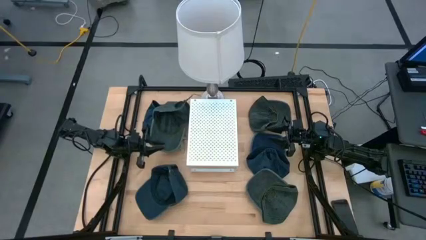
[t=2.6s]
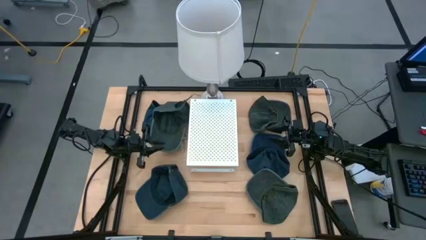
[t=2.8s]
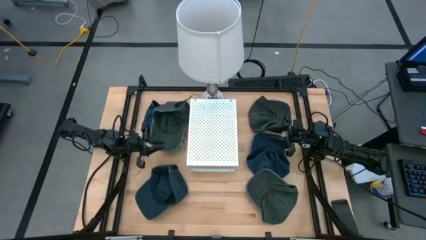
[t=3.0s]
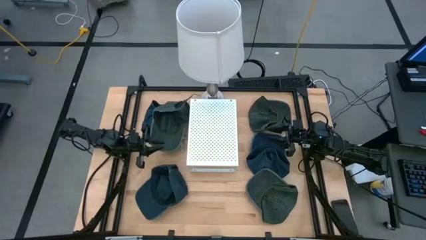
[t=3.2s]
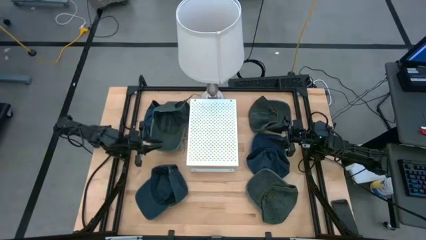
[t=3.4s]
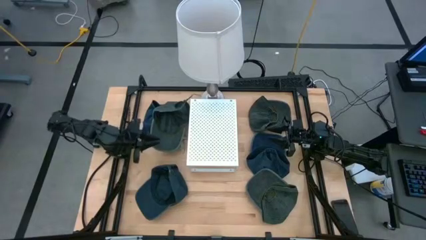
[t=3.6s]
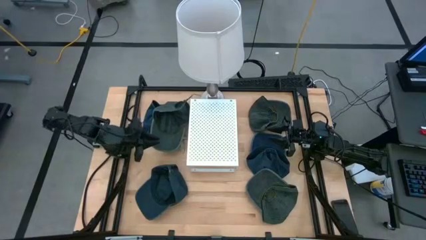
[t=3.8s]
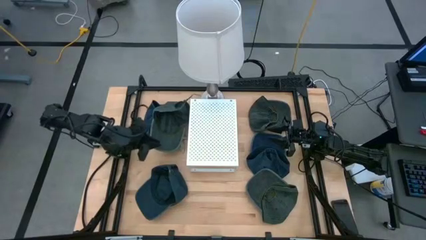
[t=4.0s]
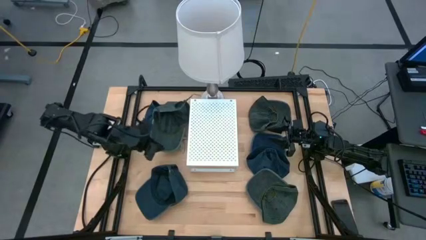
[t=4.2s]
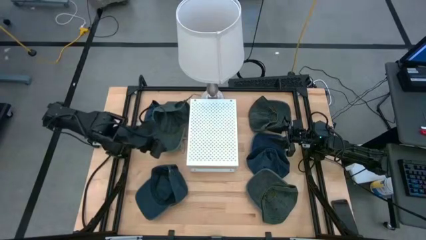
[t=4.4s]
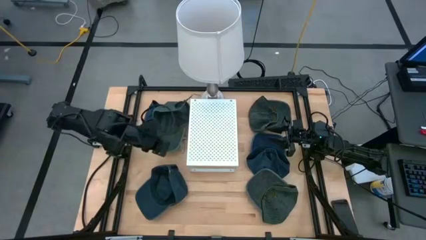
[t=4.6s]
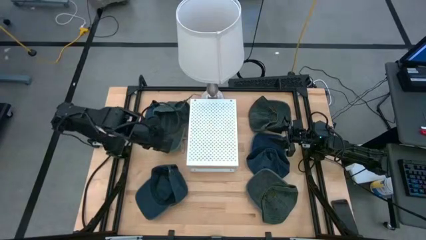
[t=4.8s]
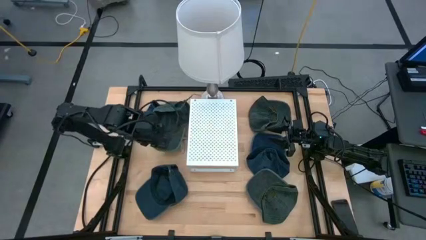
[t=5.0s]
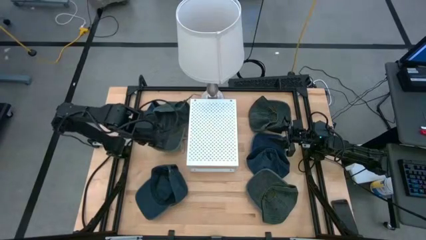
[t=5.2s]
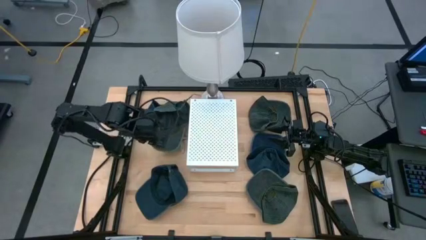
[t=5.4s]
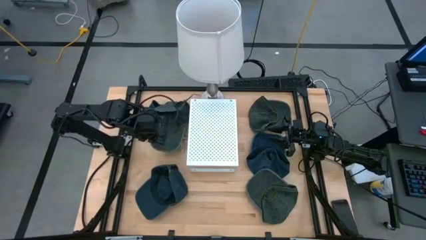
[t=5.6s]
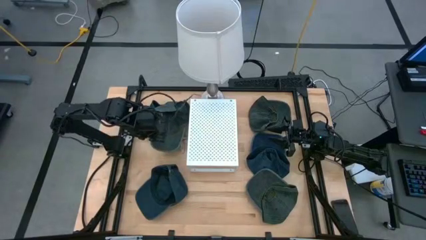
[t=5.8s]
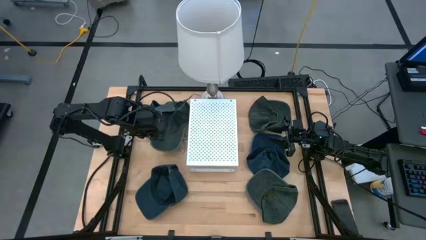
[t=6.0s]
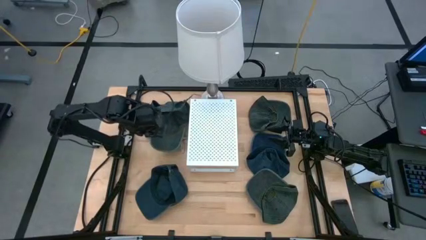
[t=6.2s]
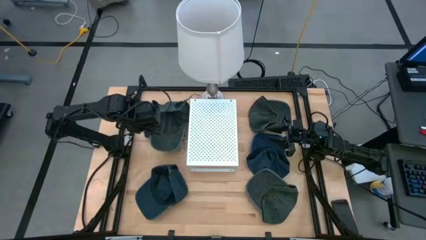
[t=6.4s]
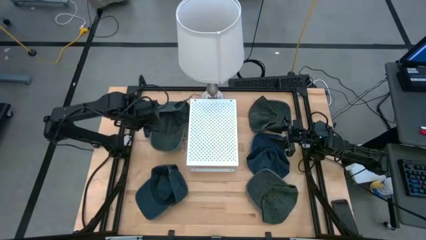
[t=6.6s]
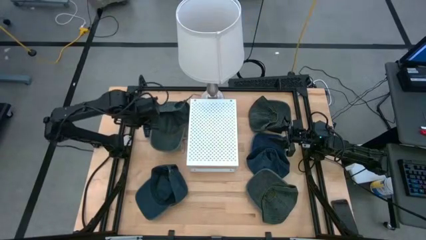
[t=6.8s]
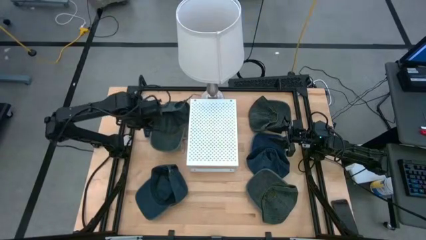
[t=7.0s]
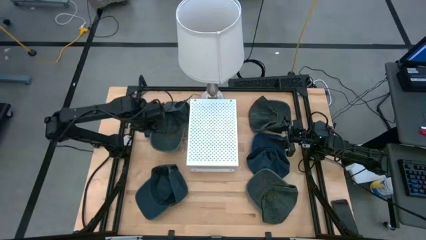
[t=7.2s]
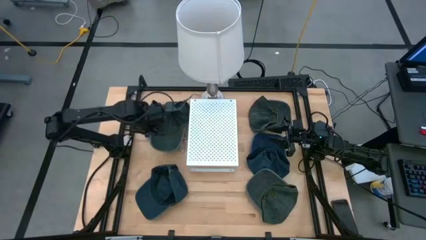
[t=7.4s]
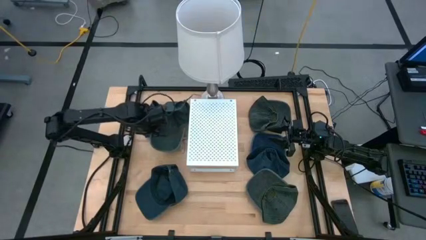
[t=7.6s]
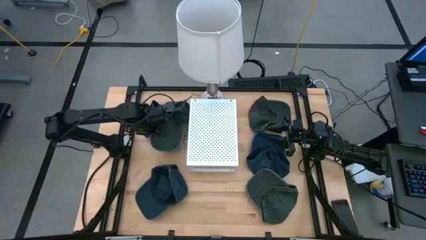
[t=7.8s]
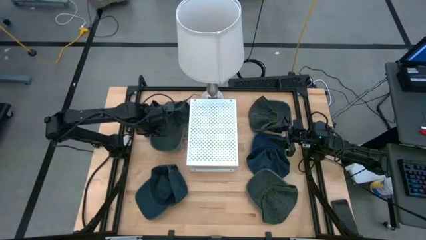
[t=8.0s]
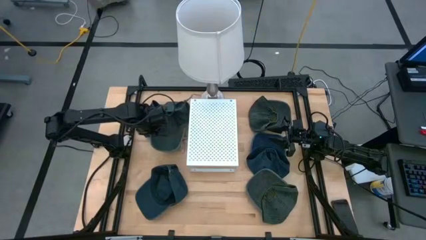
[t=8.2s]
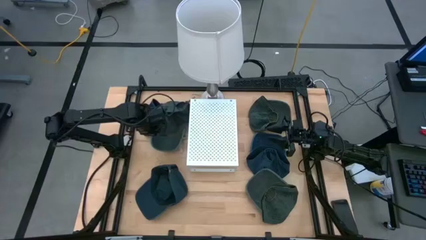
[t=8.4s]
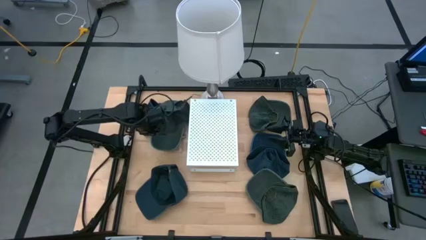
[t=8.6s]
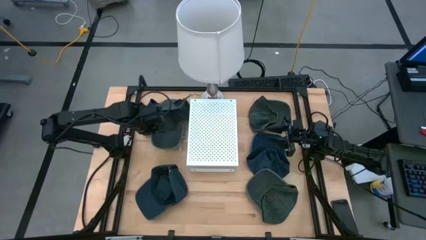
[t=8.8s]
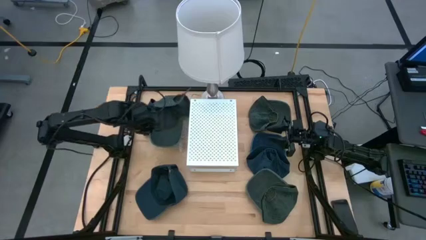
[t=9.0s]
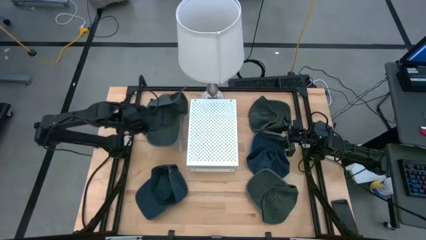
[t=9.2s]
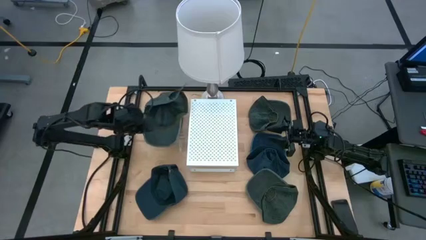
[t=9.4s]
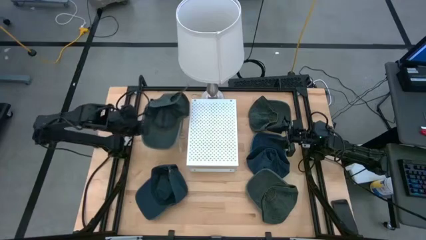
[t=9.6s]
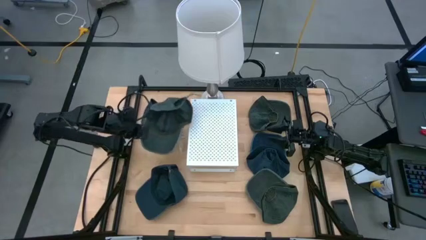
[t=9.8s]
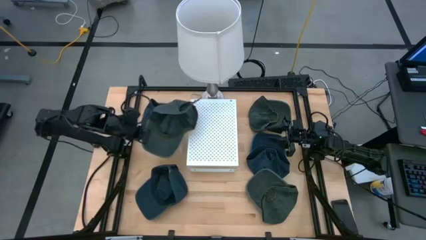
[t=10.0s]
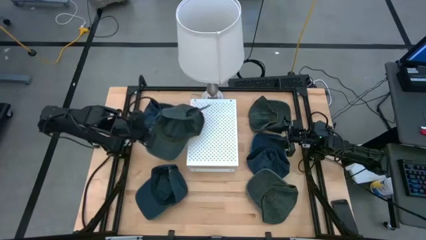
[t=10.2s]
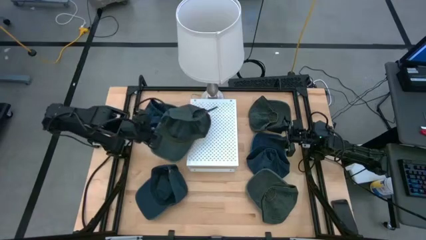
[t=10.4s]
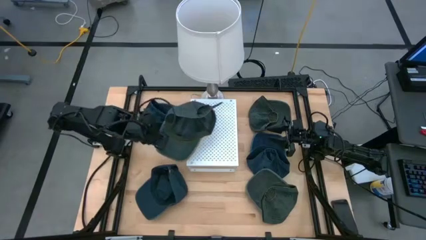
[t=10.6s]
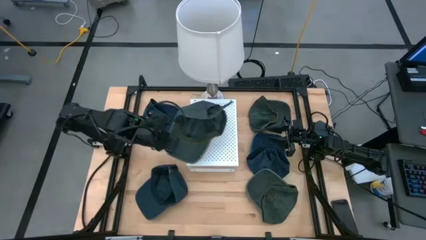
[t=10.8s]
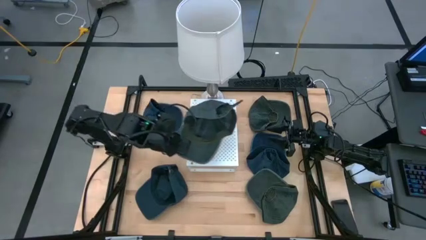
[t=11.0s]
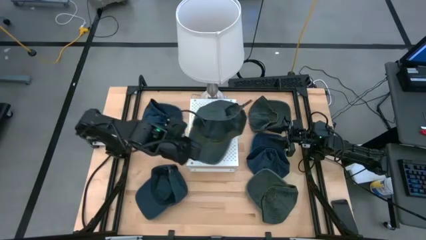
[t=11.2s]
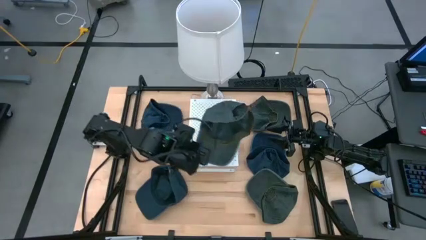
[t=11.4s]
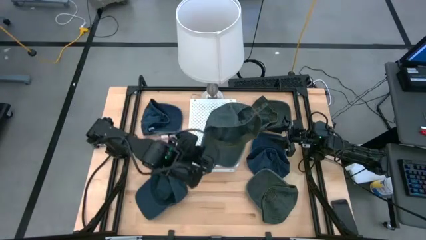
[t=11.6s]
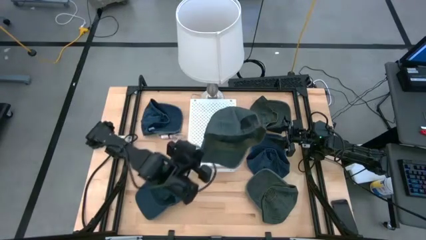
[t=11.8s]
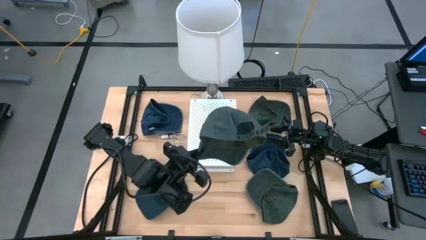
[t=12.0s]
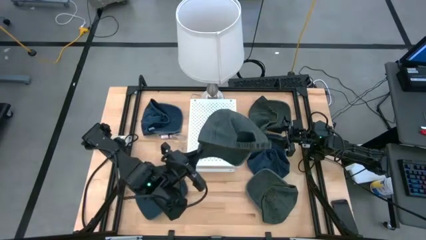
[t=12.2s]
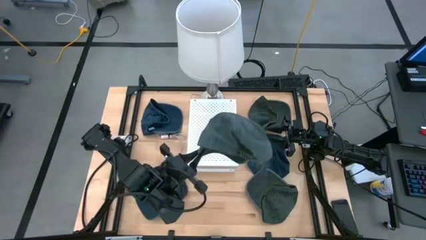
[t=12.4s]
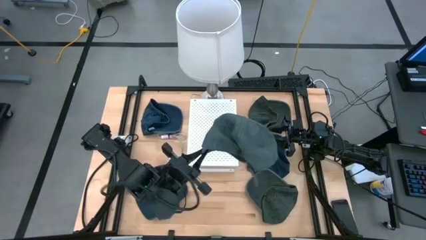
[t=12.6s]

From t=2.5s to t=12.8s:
Task: Pick & Place hat
Put the top left gray cap on the shelf

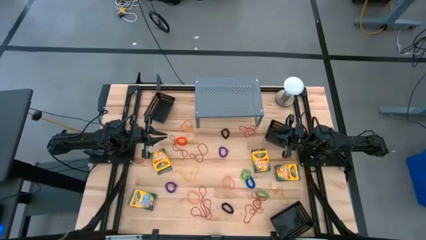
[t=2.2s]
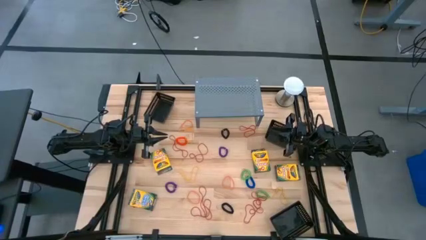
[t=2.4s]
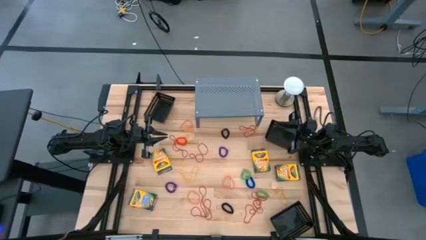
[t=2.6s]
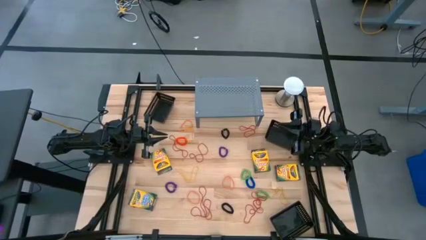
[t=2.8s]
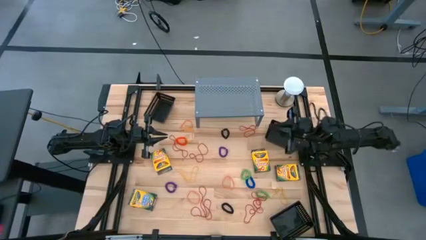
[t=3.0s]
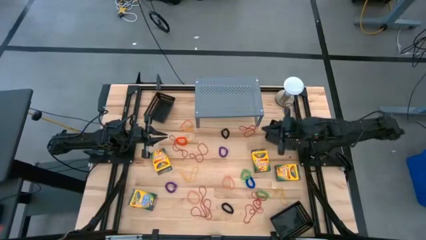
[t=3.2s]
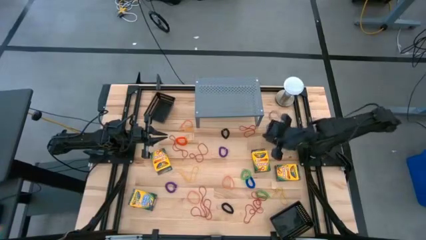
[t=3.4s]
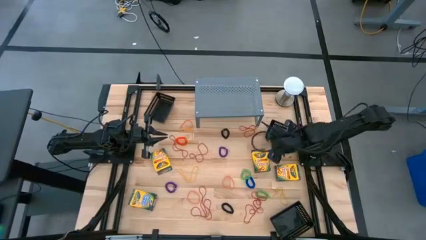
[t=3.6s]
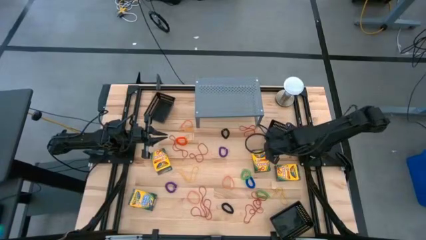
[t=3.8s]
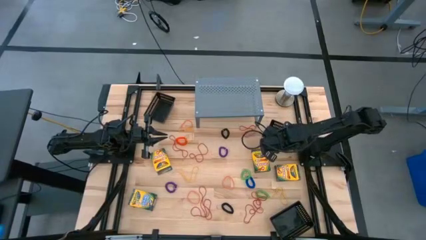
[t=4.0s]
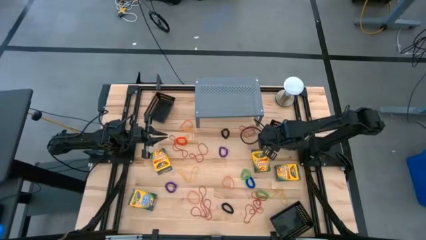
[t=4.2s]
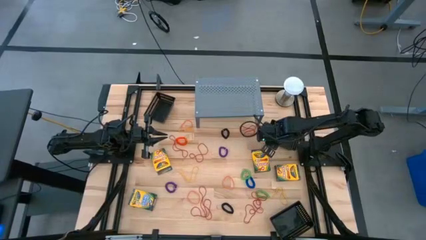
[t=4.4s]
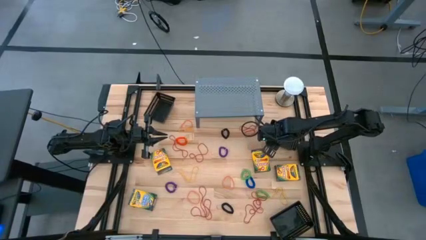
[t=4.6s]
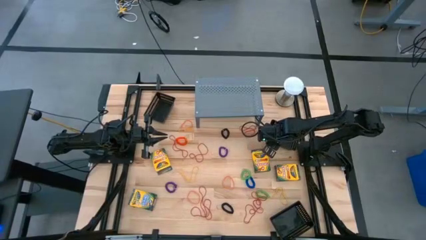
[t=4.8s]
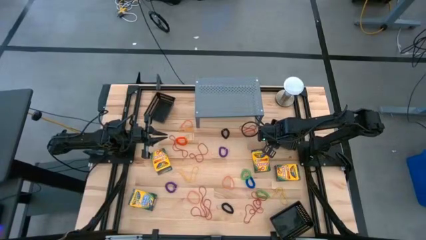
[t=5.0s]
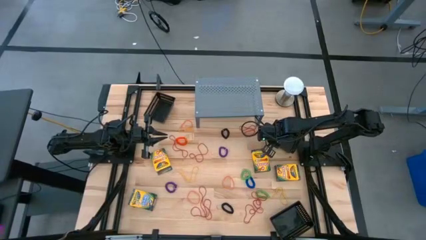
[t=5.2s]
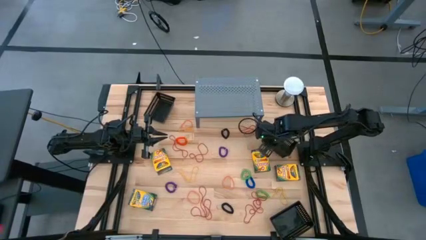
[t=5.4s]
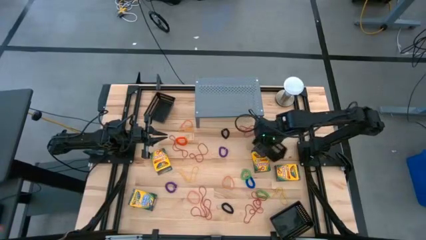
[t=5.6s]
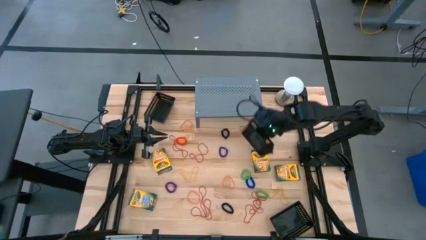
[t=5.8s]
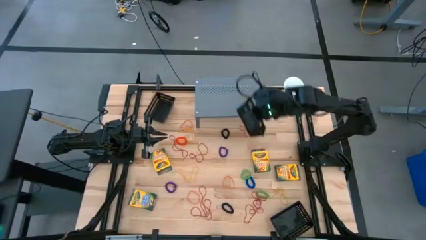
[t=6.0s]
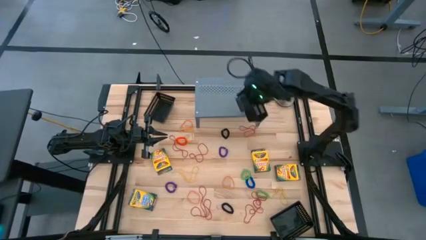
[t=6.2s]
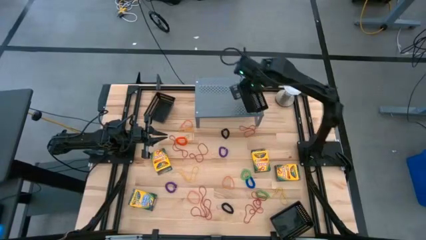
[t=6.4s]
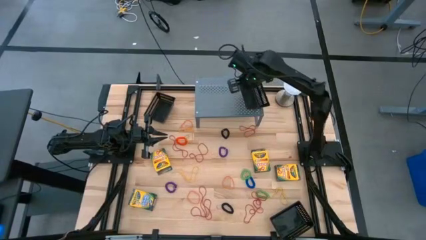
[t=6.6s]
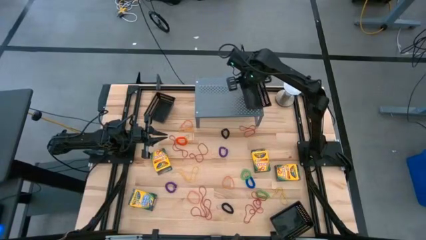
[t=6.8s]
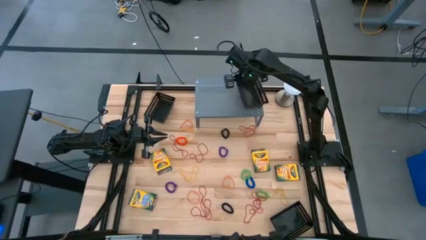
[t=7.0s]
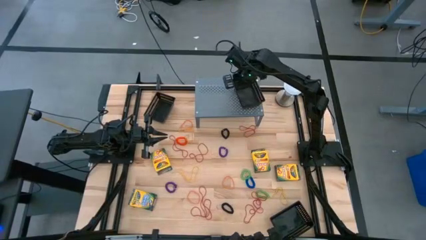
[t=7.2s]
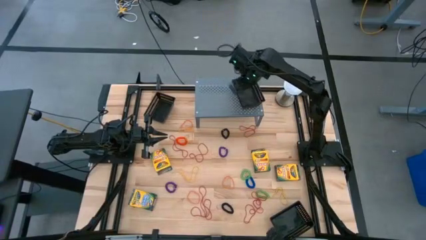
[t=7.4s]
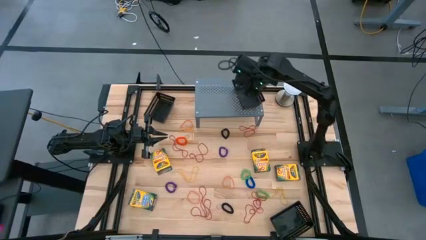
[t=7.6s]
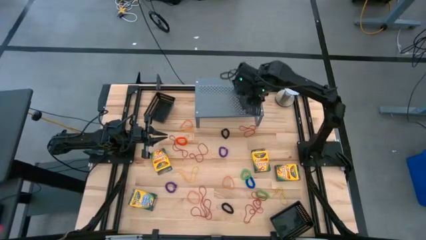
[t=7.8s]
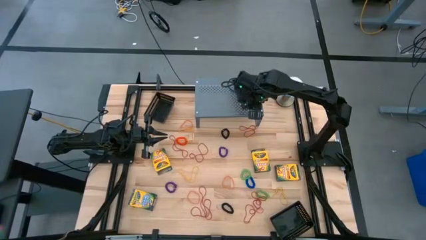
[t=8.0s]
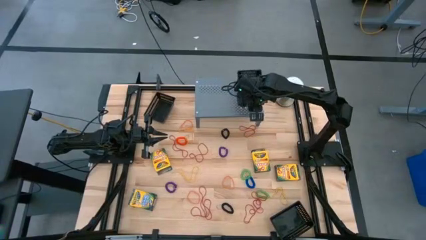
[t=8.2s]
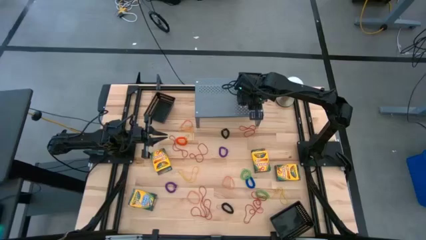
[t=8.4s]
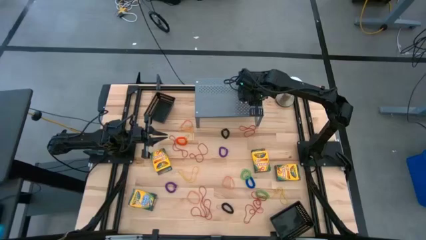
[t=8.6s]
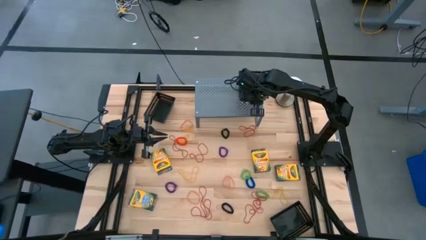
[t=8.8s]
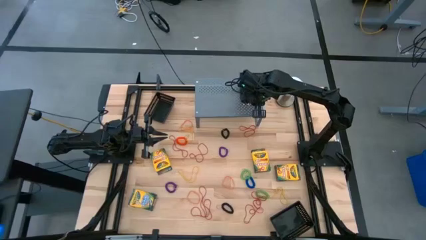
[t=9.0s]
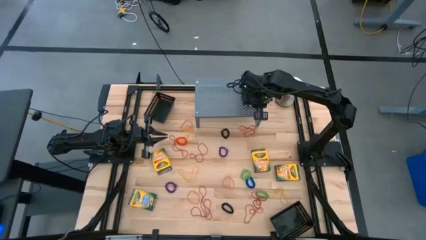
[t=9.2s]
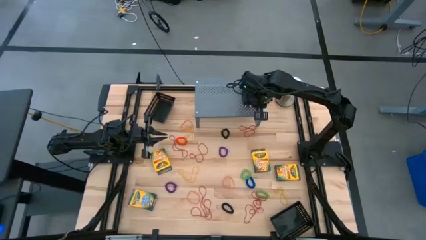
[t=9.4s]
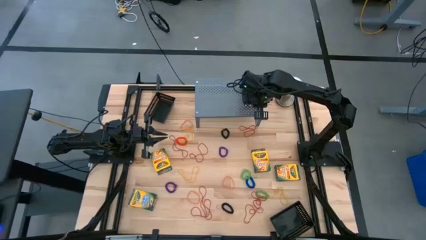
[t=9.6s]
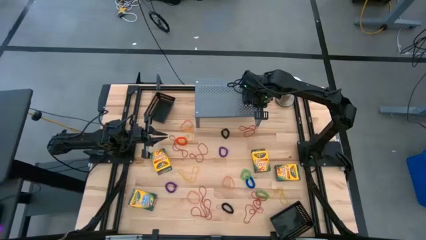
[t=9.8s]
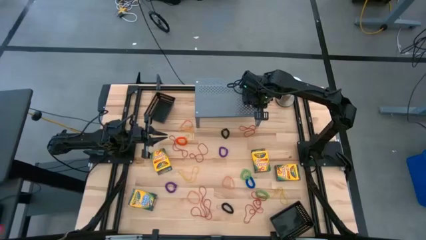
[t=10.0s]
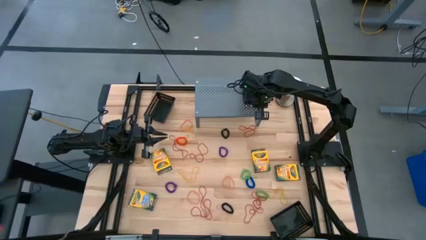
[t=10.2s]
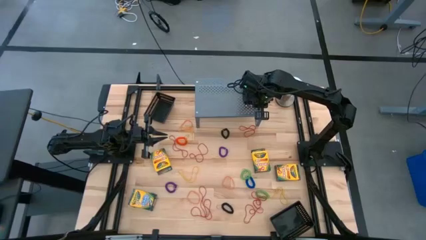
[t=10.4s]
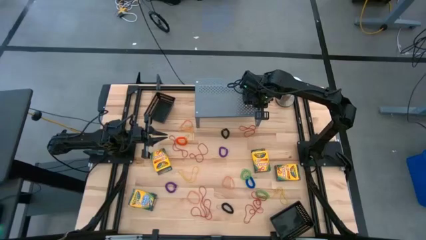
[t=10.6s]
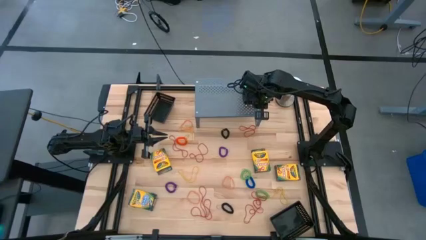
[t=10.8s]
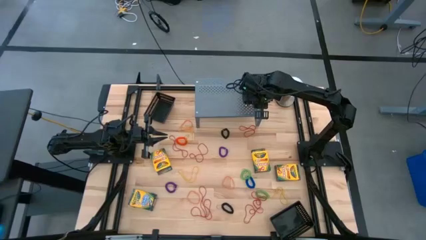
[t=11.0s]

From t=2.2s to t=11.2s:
Task: Sort rubber bands into baskets
Put the right black basket into the shelf
